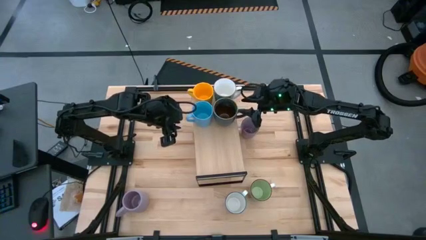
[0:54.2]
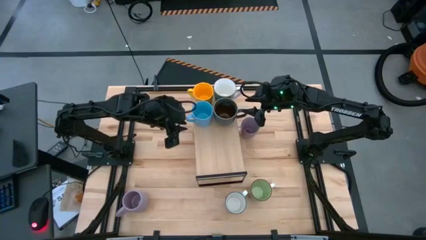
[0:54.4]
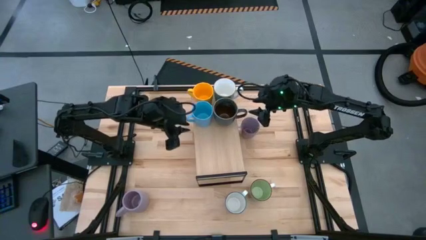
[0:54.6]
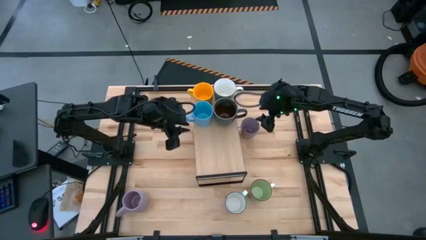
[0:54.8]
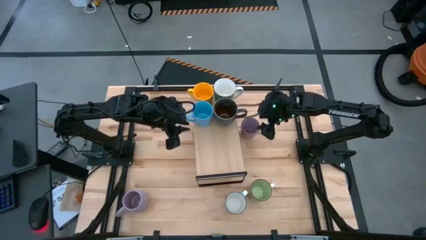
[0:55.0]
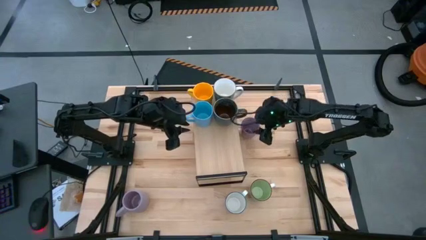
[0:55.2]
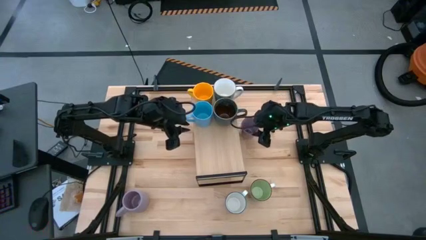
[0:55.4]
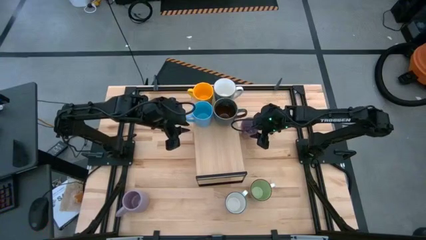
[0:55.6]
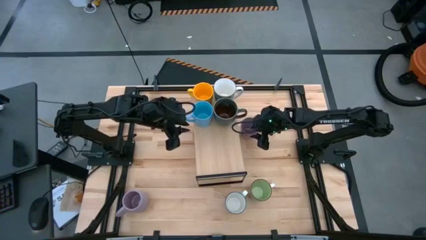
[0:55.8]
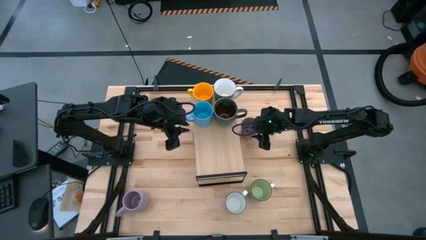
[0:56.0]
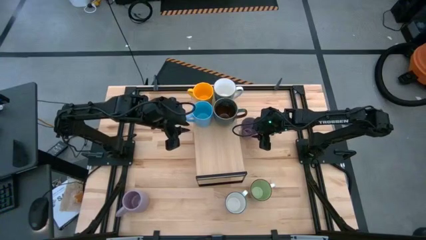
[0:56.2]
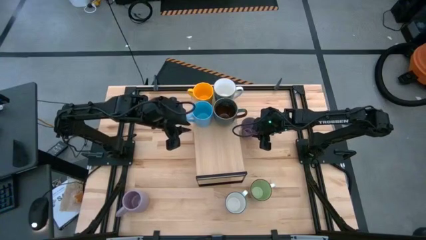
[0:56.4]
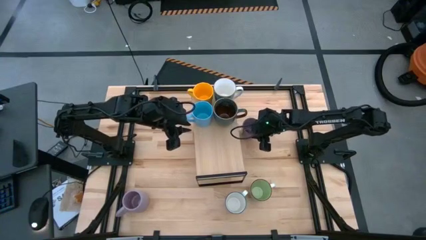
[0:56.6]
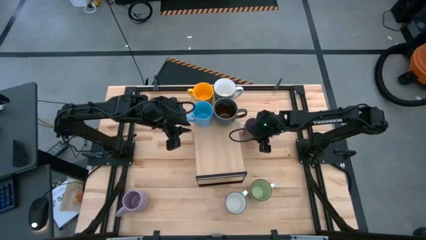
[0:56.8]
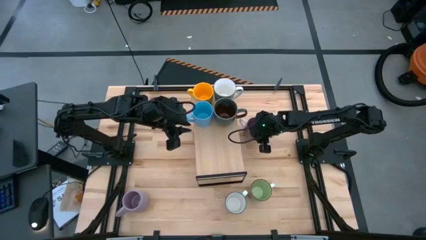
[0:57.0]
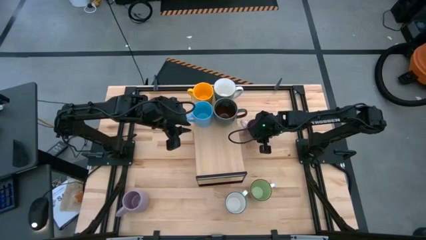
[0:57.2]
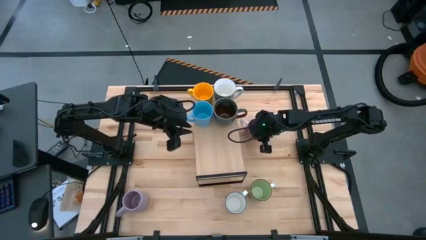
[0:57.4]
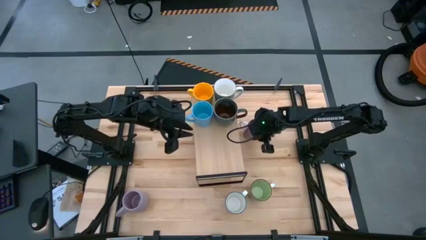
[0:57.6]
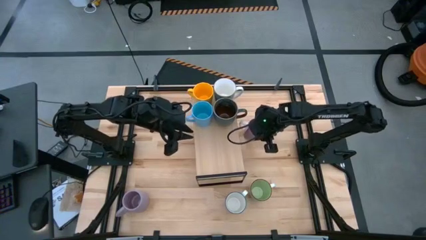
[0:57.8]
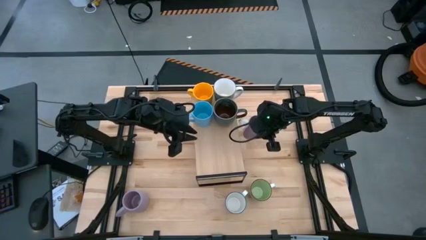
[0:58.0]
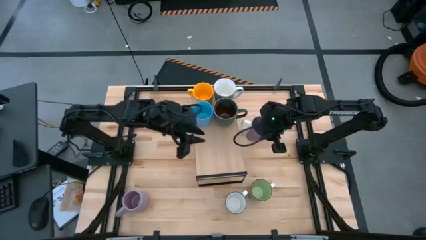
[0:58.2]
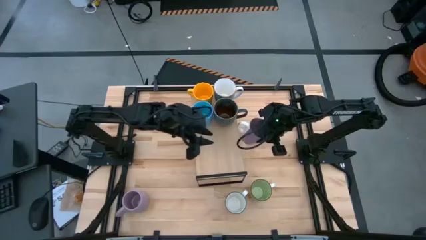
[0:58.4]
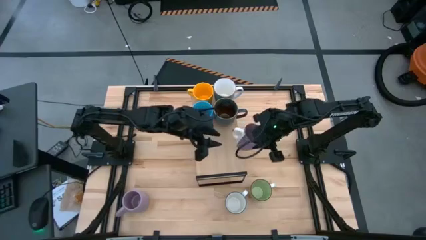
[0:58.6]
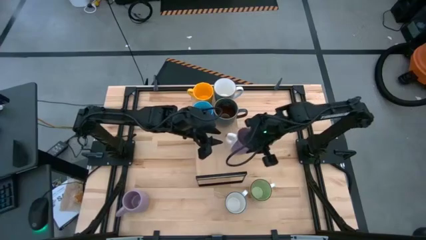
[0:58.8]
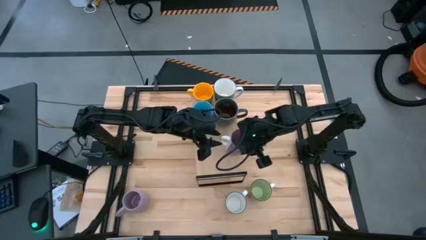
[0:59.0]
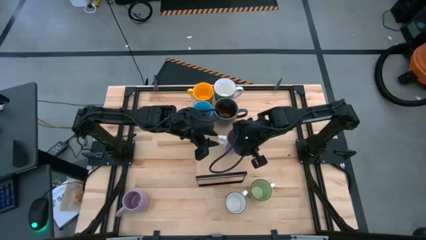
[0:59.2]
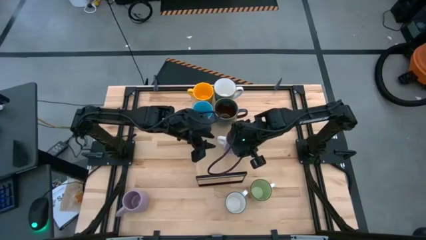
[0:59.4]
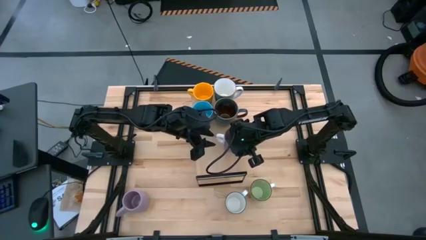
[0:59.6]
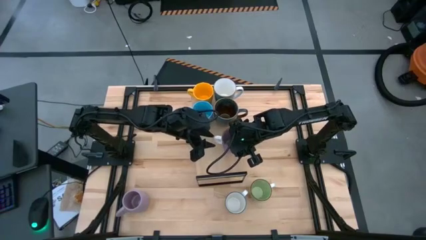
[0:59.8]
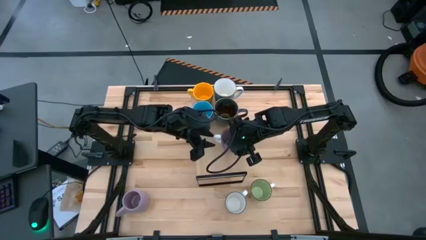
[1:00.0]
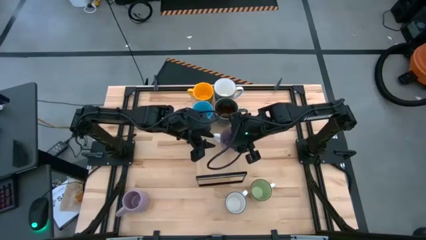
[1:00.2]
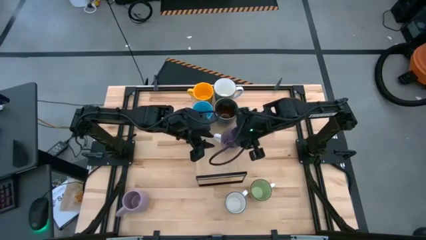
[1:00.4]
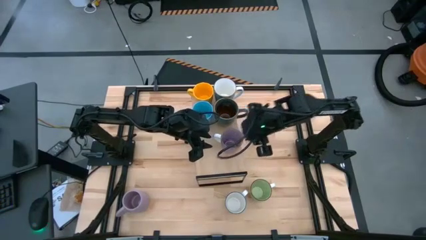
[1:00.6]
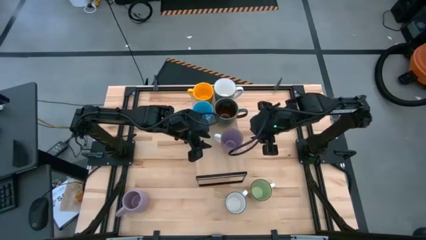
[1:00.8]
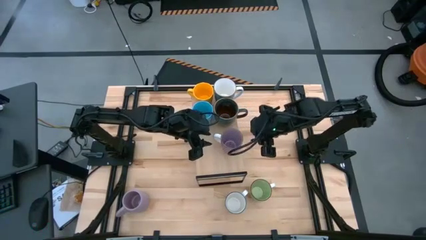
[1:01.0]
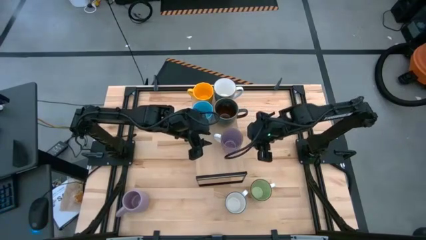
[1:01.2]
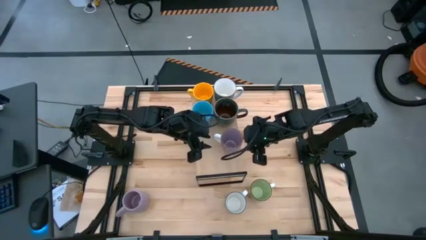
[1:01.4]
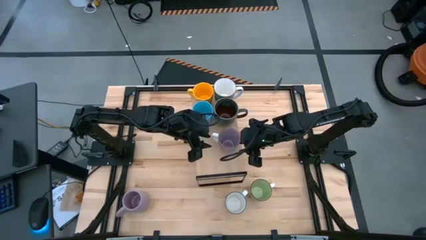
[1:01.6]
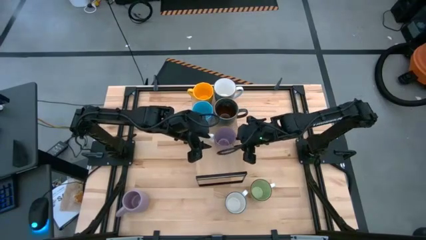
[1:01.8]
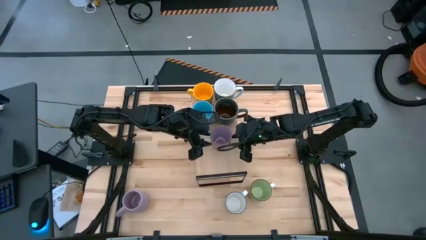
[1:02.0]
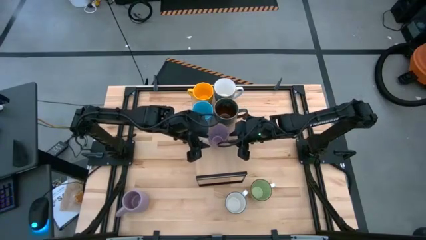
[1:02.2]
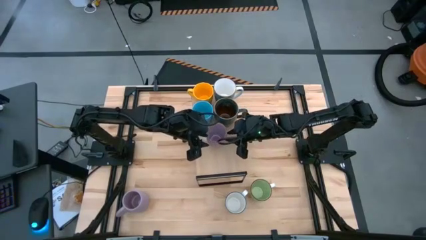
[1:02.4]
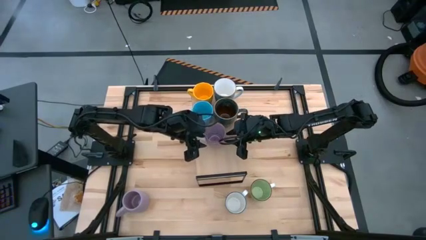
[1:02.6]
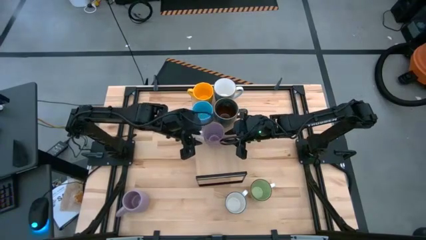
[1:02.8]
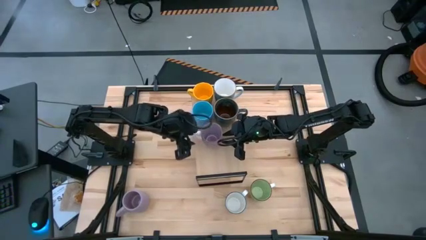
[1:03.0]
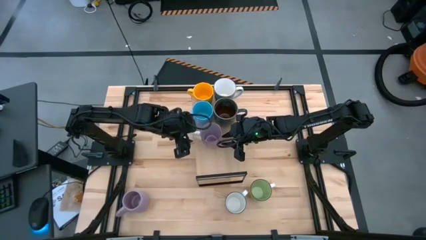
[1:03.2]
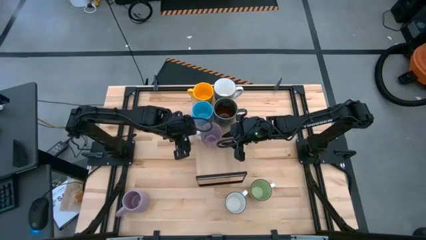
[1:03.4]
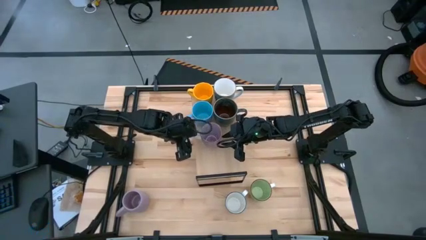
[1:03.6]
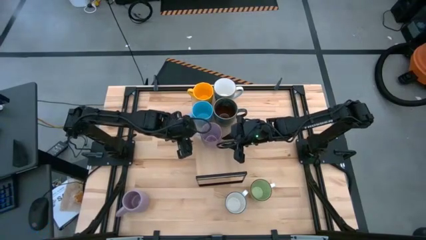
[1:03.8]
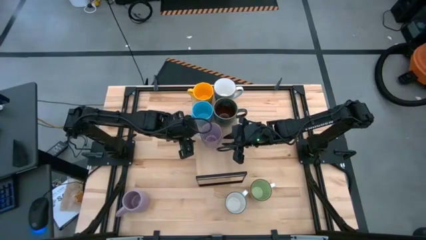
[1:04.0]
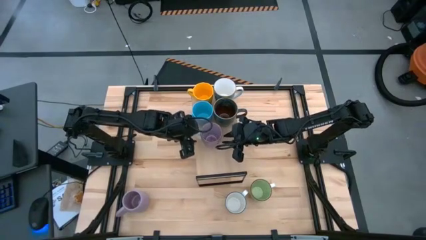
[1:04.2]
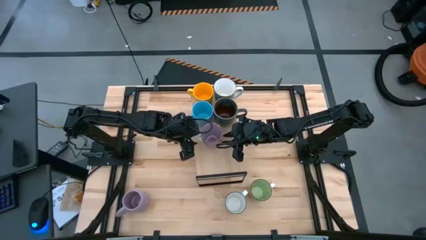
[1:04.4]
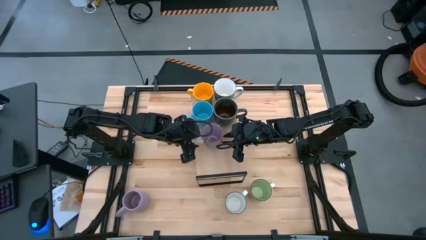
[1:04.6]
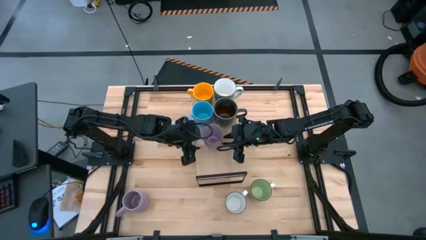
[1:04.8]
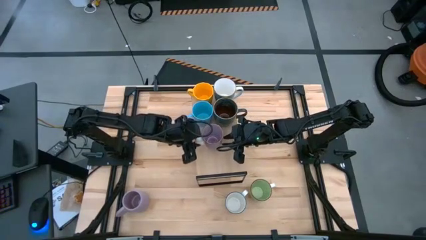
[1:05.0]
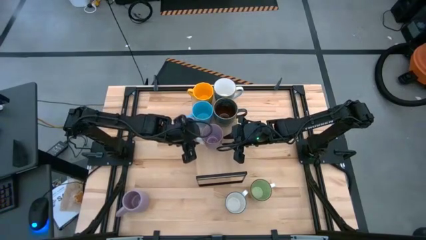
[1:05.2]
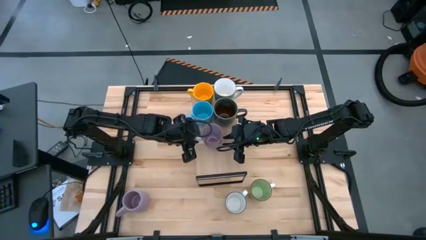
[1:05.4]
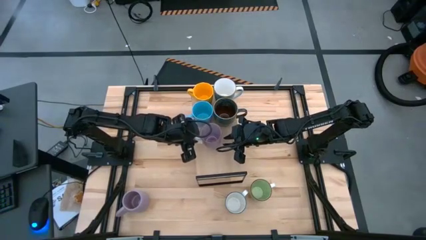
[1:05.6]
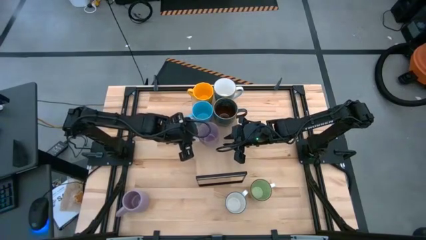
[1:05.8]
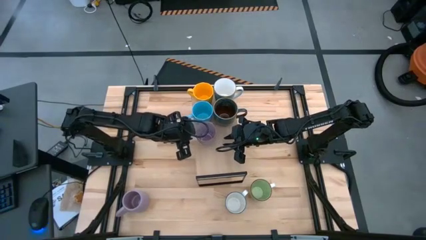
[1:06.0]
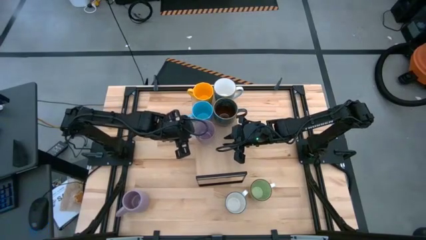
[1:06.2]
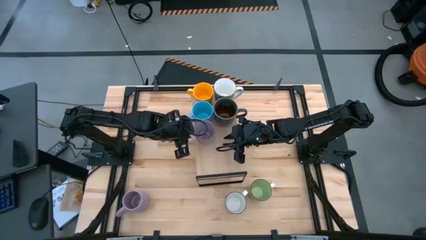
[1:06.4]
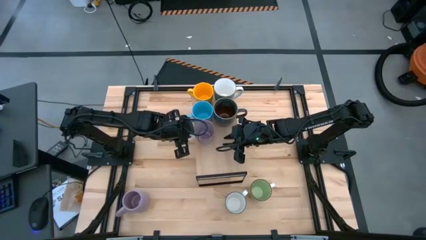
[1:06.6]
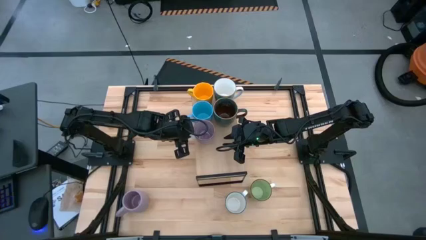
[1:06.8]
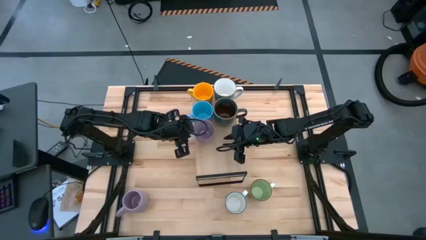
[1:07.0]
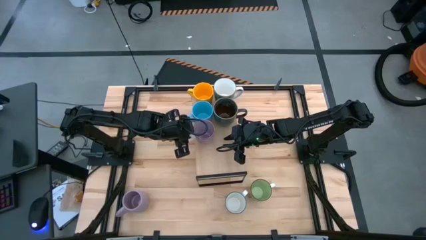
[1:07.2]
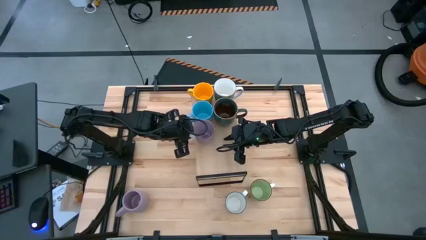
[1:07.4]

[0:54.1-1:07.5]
Task: Place coffee mugs
Put the top violet mug on the shelf

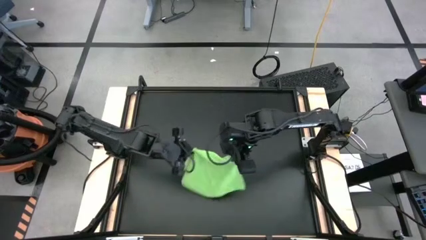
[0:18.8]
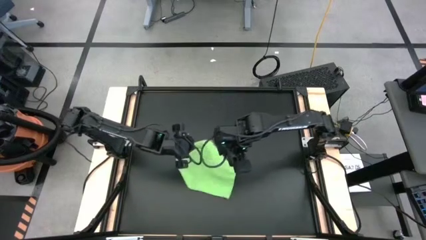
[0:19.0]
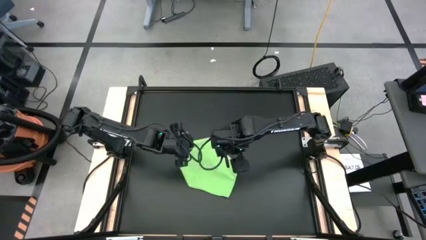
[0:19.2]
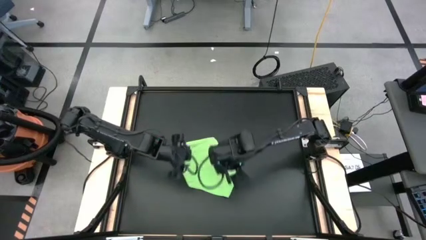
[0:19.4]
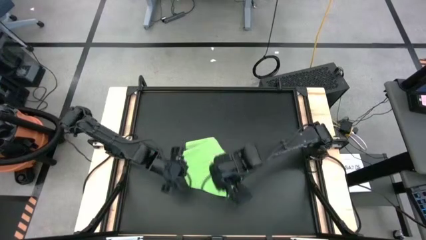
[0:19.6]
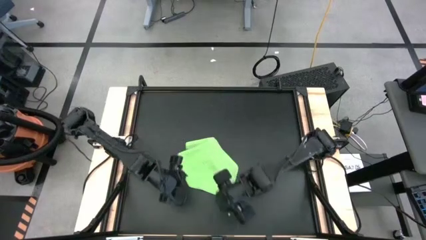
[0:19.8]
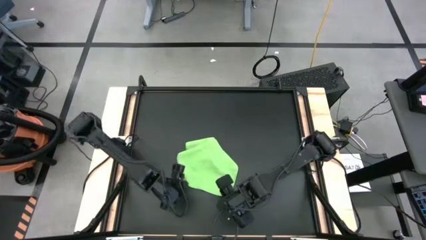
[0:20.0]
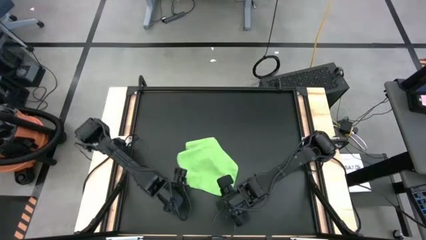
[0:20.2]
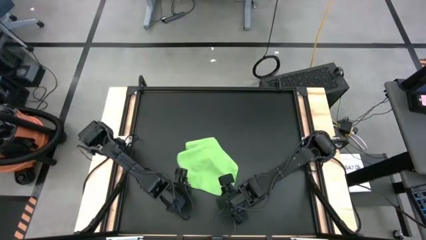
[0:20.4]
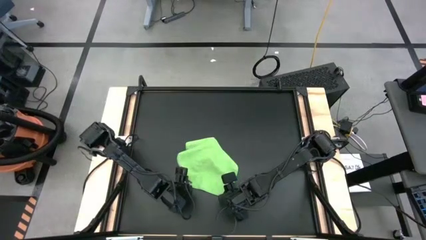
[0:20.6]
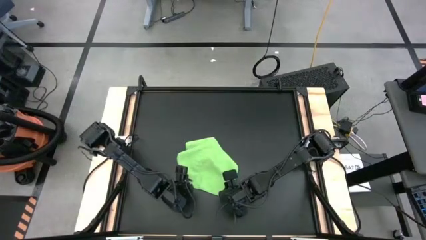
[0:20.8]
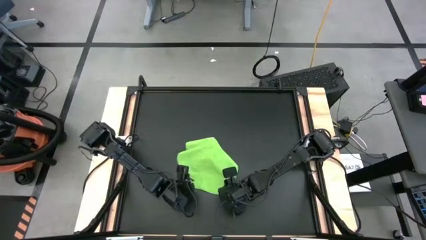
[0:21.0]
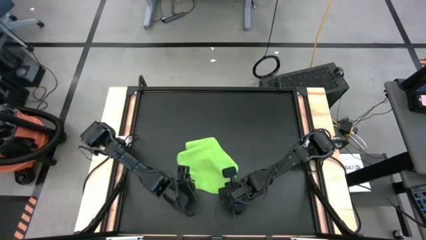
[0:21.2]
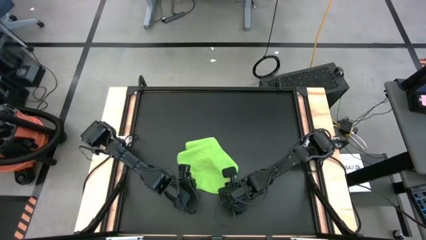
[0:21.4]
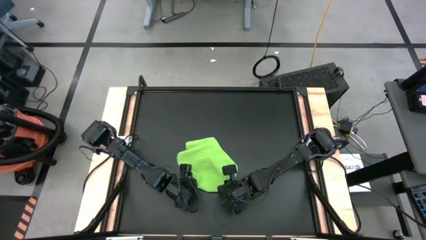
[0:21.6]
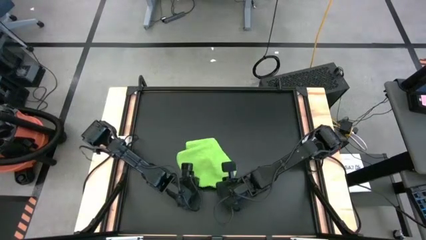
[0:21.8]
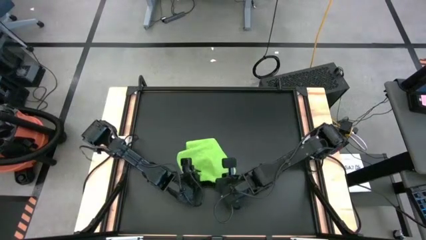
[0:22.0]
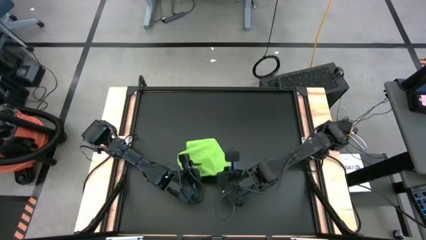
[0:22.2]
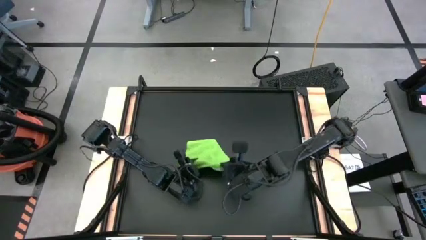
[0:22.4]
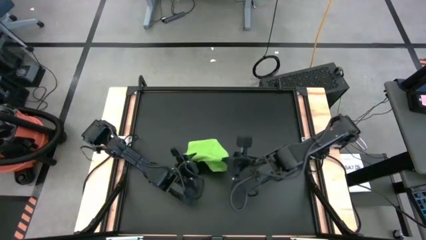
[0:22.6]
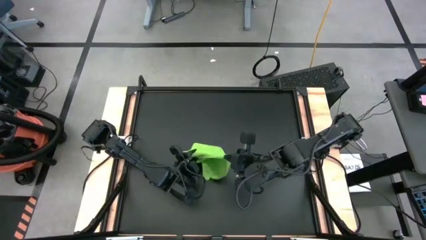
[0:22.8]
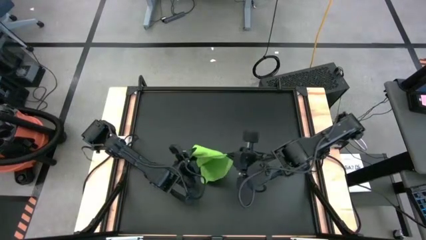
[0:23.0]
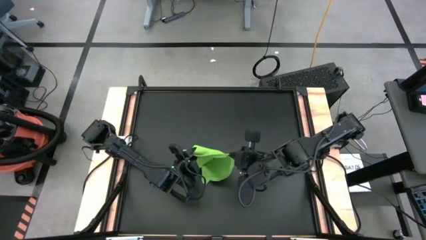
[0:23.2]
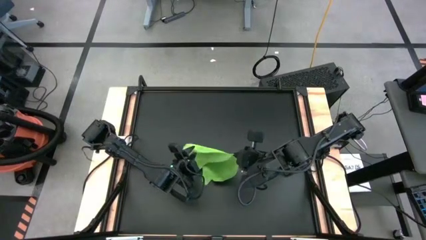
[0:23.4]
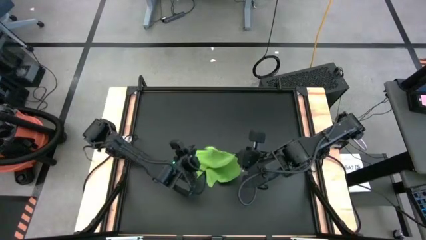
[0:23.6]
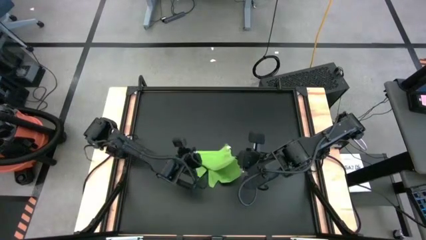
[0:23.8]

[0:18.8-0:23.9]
Task: Roll towel into tight, uniform cylinder
Fold the green towel
